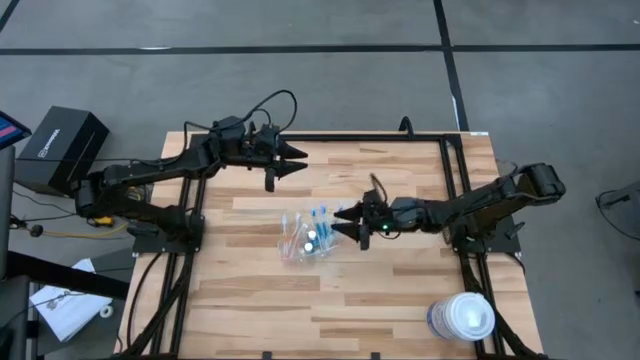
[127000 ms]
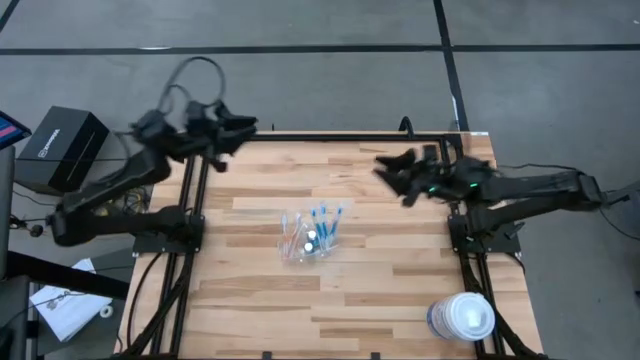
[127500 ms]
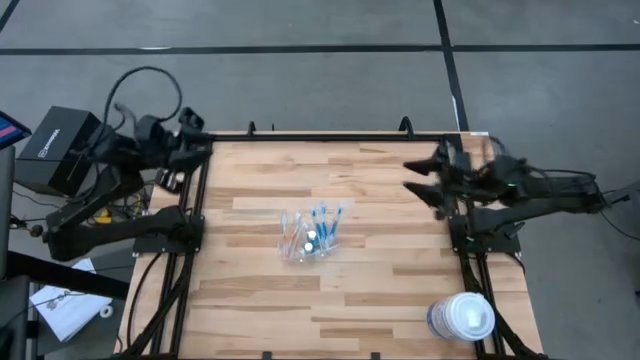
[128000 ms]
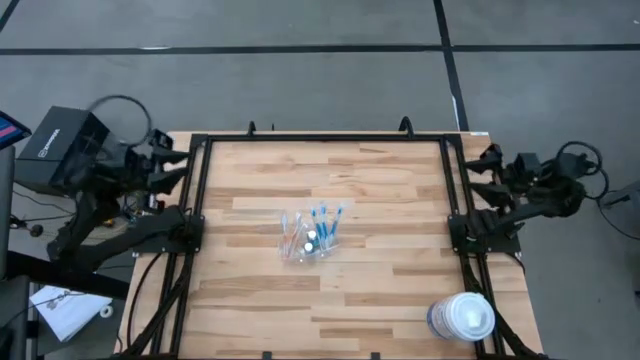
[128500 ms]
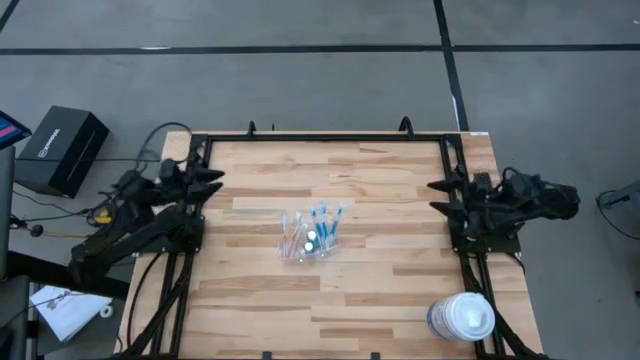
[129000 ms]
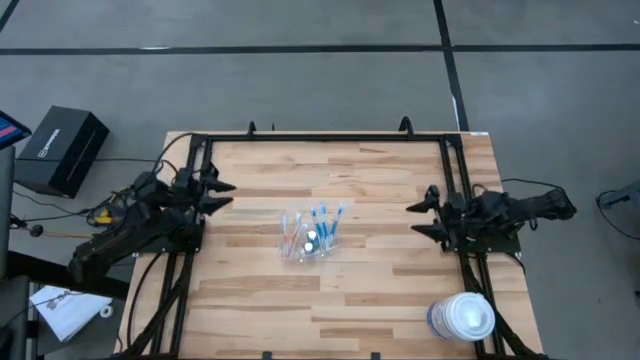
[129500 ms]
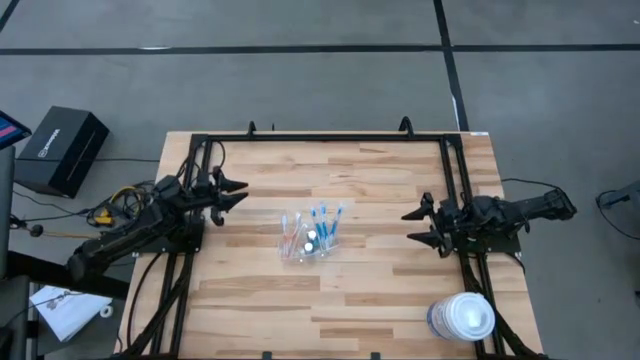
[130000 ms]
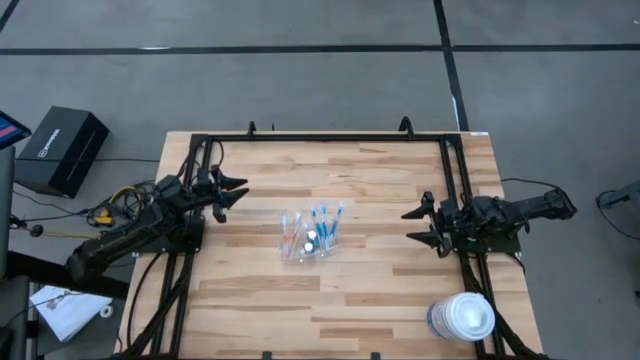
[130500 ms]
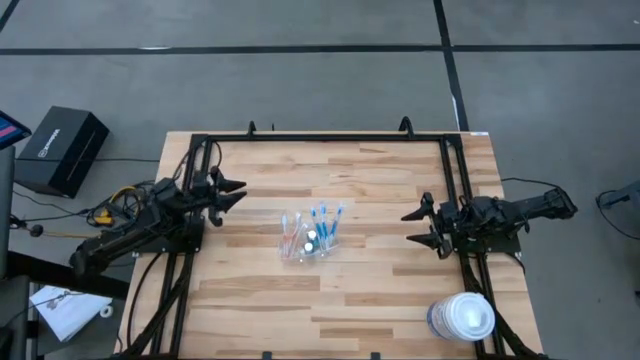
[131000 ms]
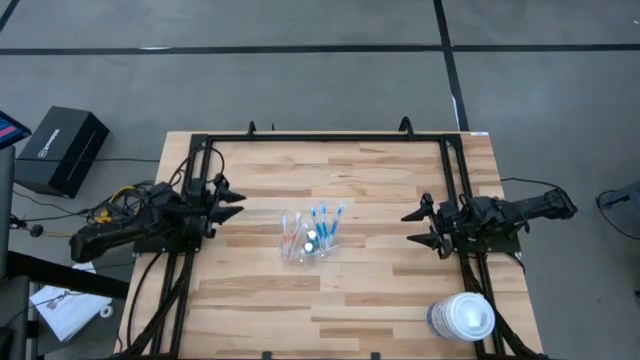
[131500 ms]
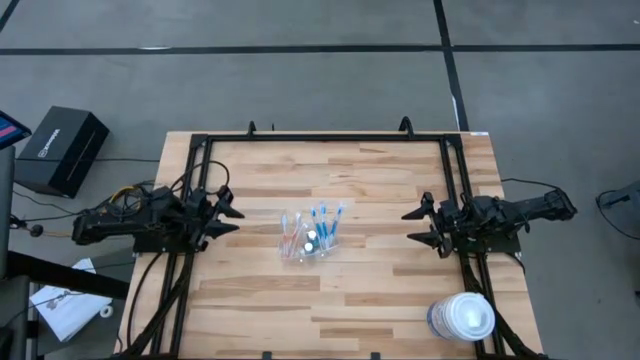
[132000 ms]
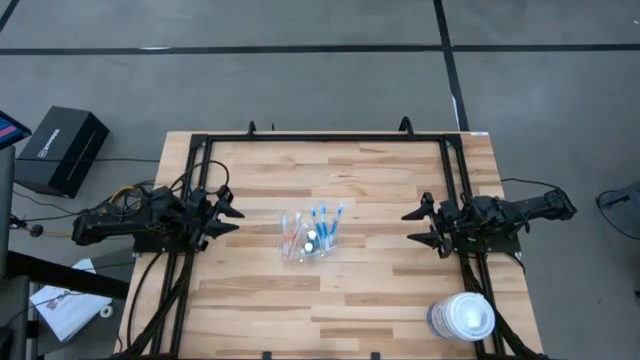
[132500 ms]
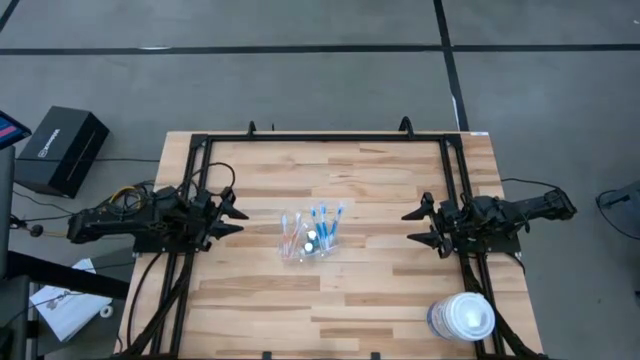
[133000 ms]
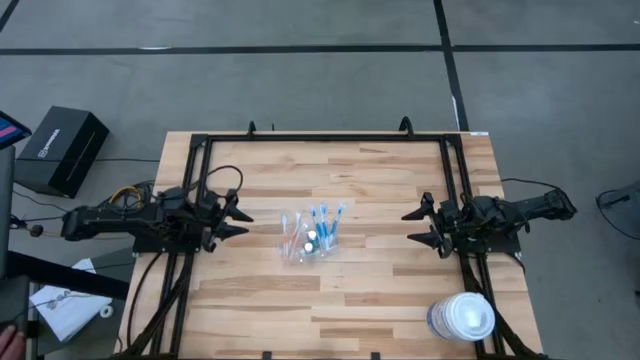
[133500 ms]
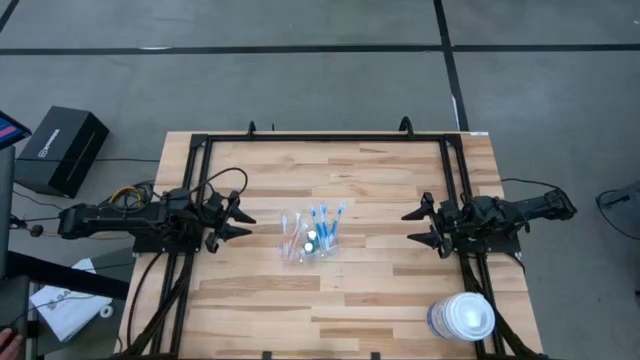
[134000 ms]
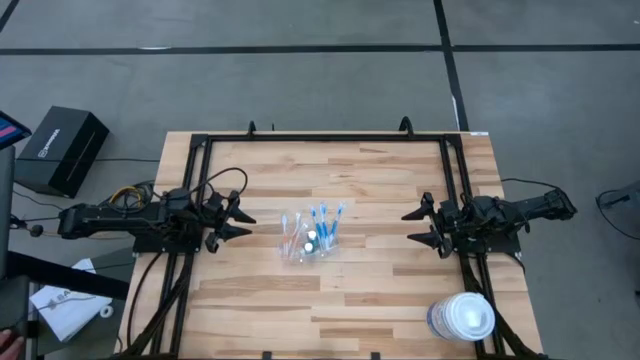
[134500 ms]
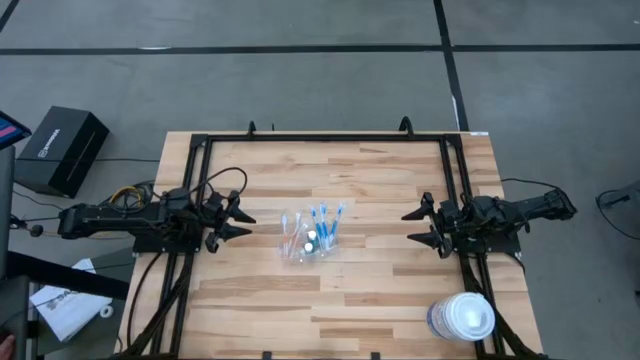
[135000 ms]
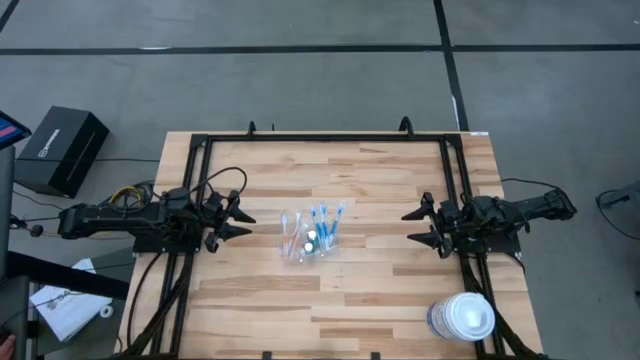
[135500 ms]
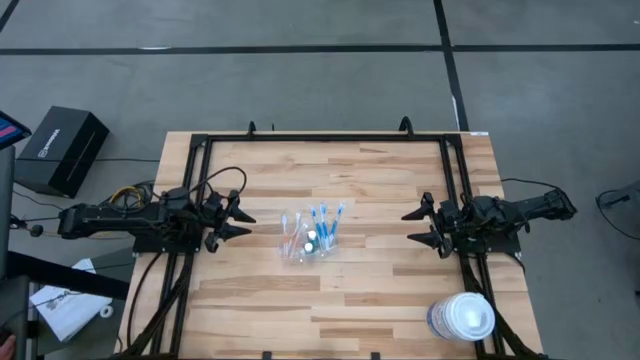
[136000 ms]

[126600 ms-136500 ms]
Task: Pick & Place toothbrushing station
Return to Home Position

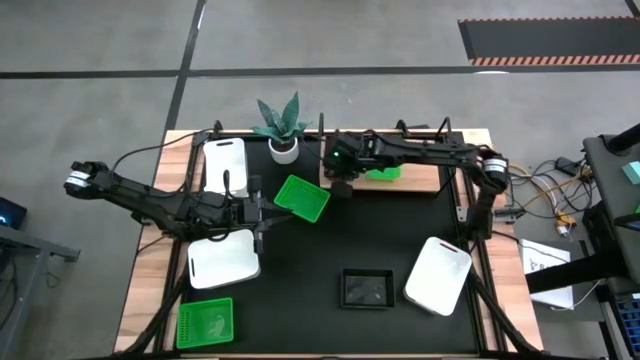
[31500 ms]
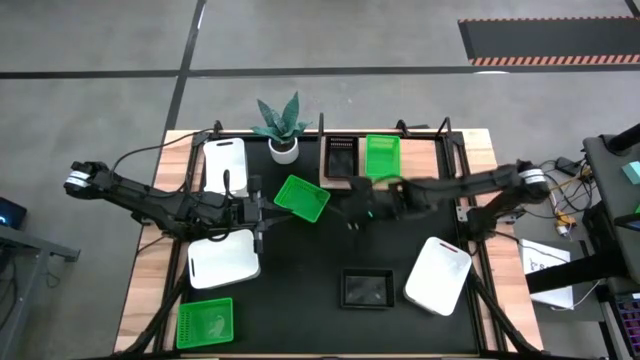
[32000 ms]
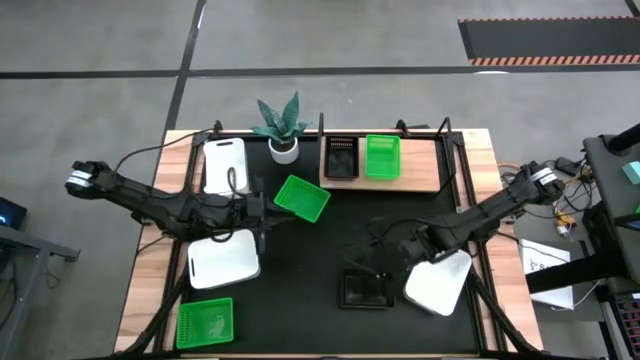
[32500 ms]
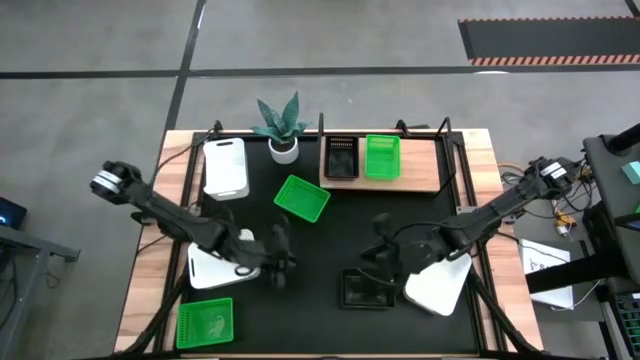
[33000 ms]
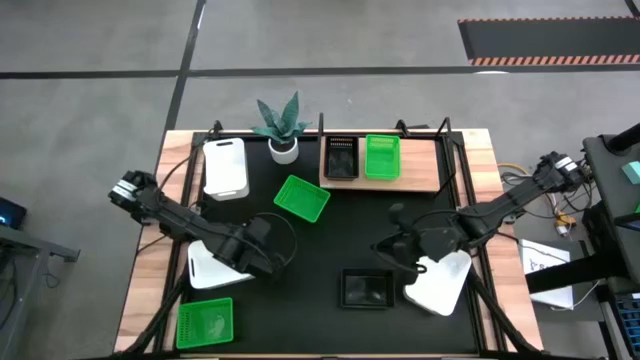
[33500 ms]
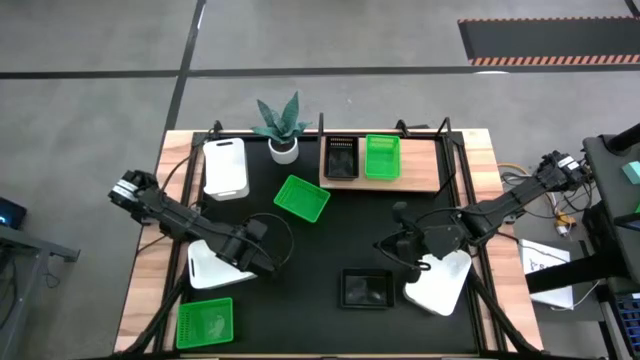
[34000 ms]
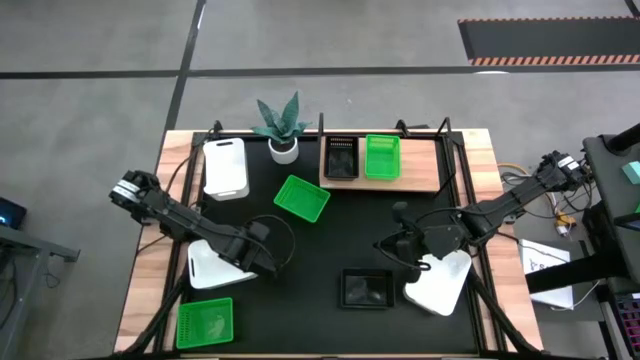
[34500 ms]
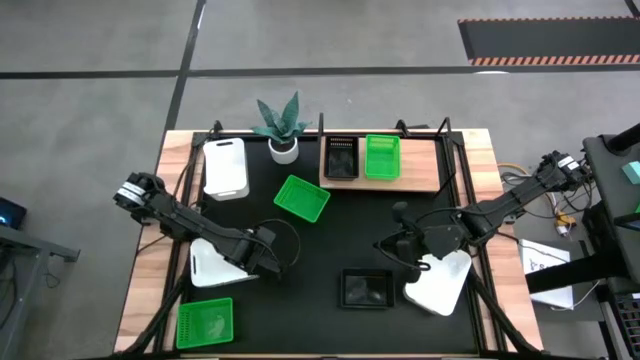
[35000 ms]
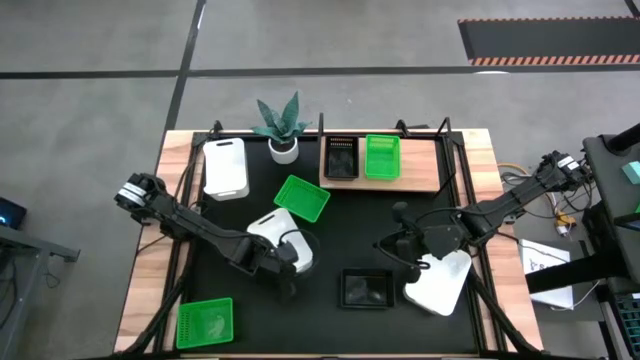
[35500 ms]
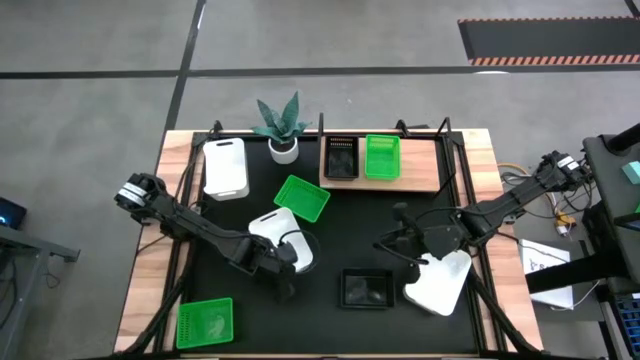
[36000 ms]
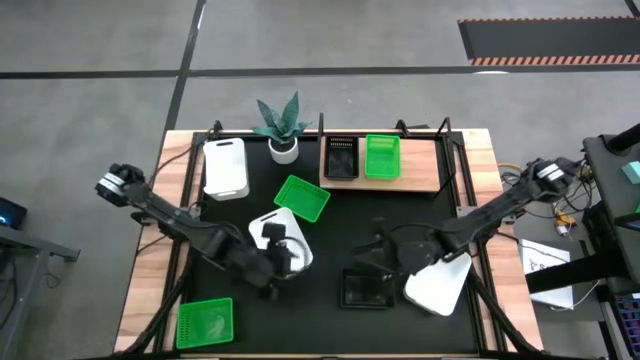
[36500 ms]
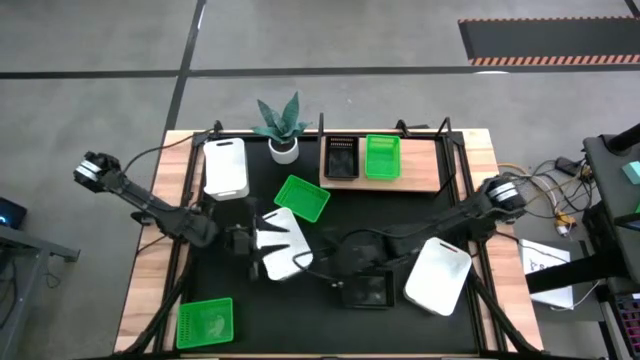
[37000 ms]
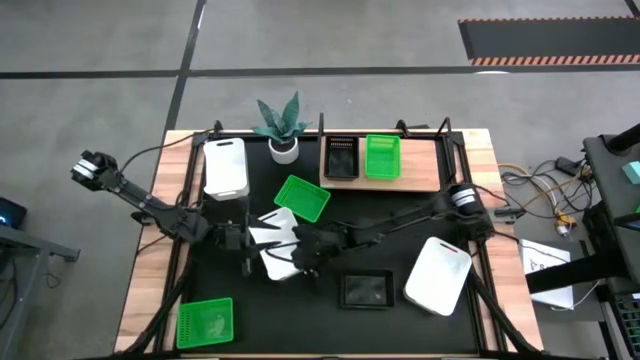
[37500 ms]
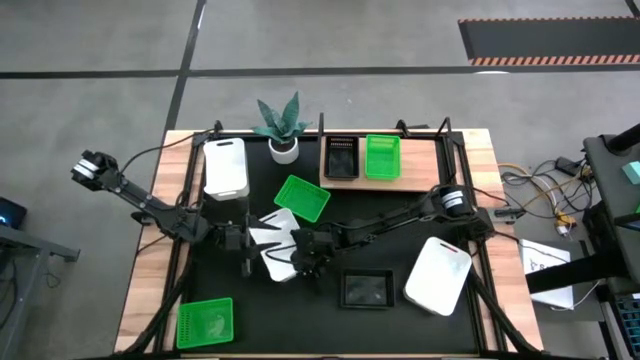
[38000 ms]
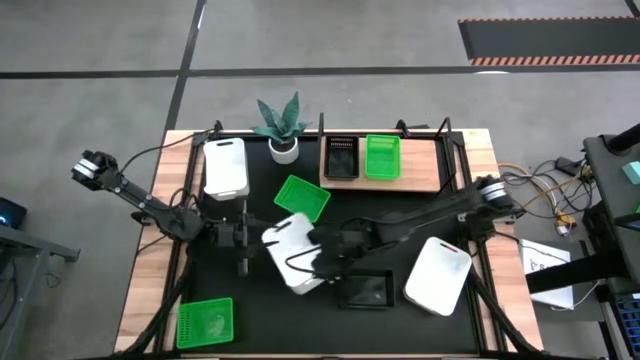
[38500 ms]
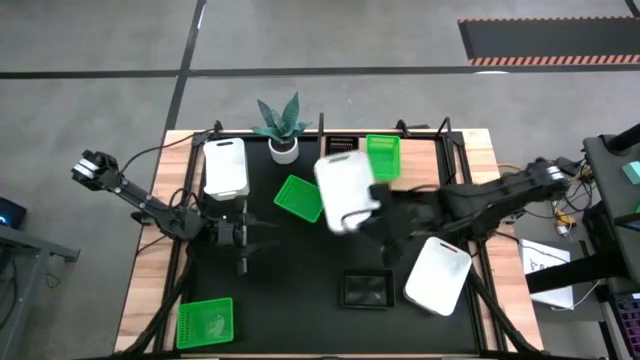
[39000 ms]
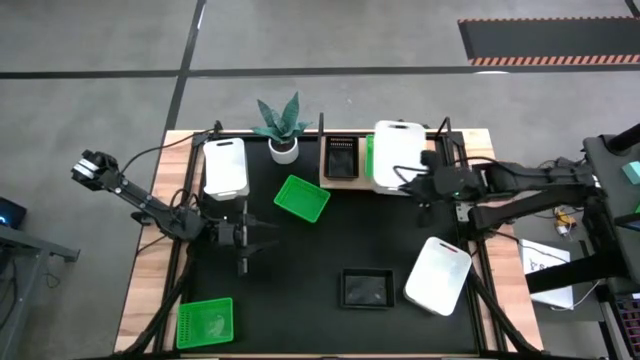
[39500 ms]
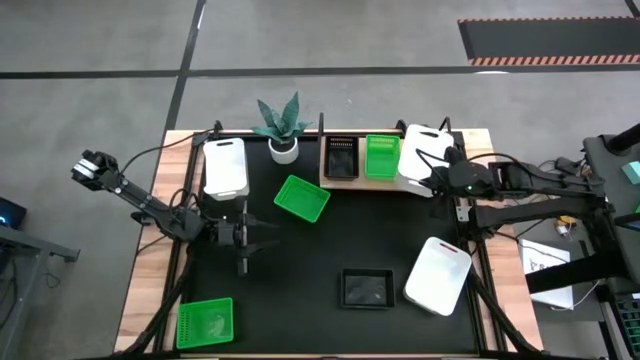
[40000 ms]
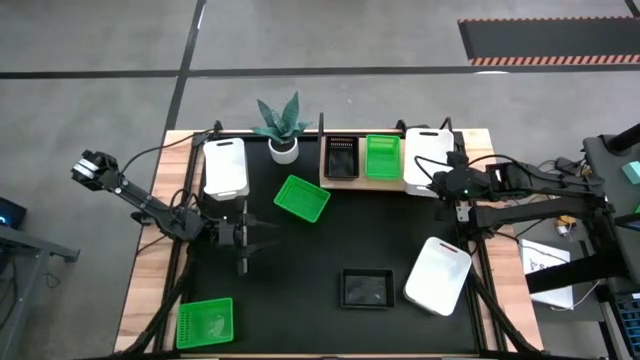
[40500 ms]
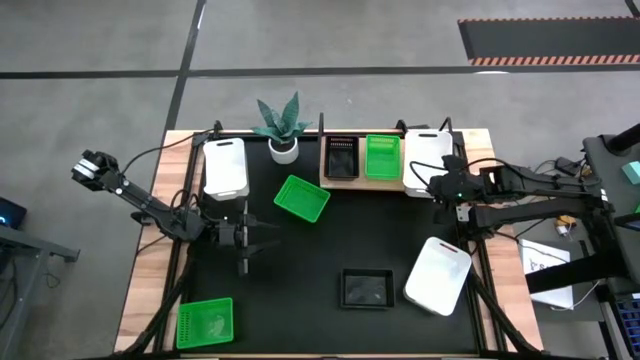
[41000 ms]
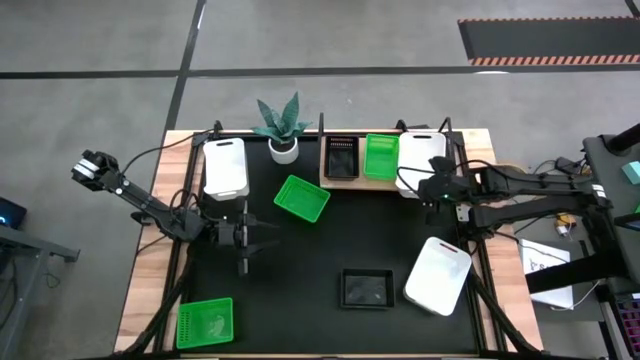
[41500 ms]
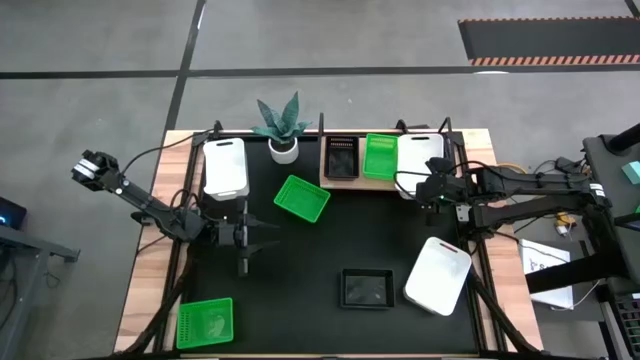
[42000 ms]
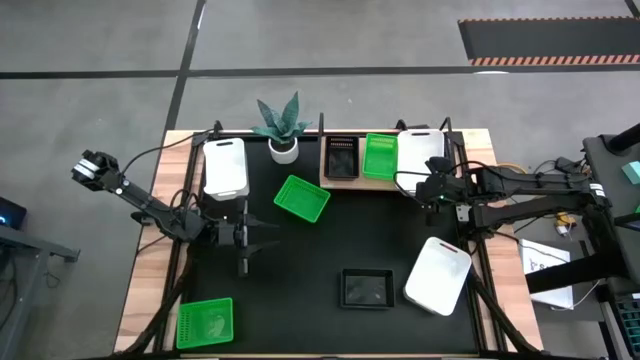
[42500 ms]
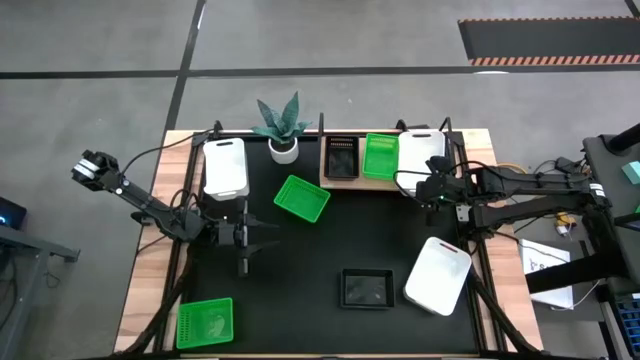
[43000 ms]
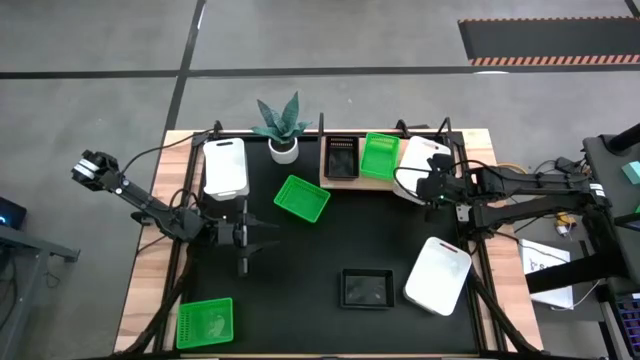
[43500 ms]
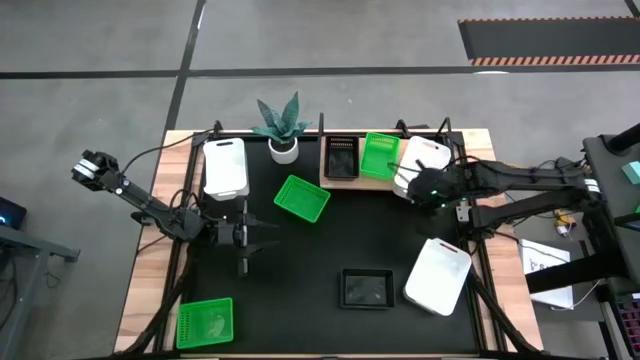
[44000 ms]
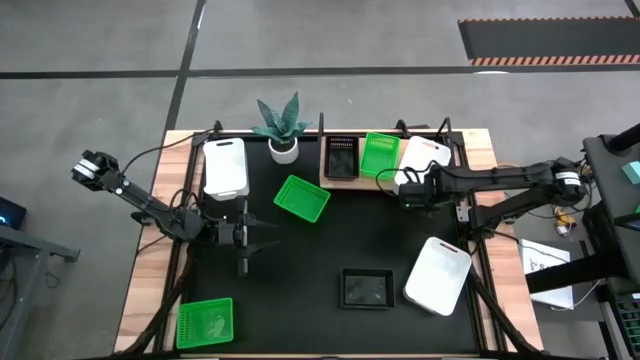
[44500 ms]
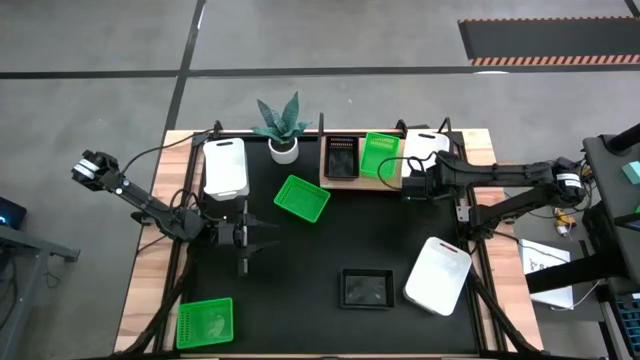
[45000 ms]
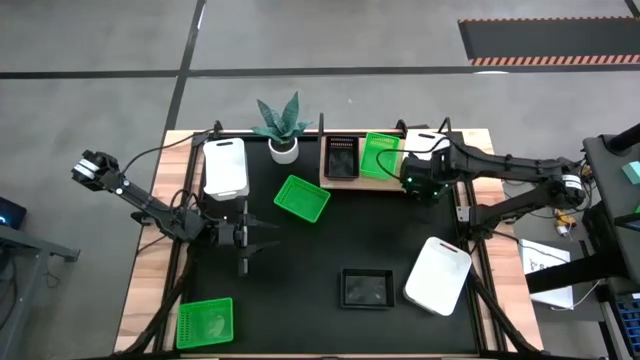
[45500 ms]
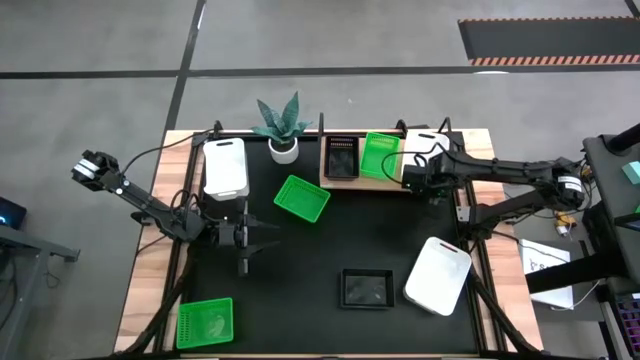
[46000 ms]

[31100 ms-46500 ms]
Task: Stack baskets on shelf by color
Put the bottom left white bin on the shelf
